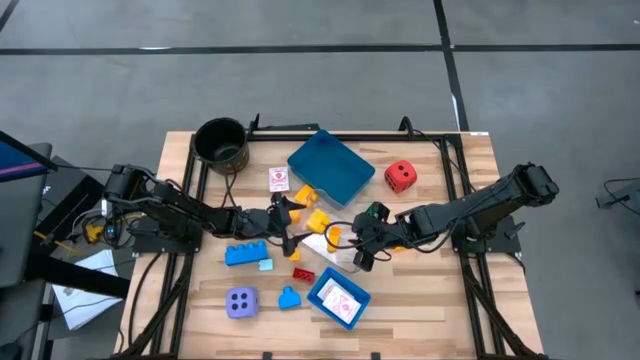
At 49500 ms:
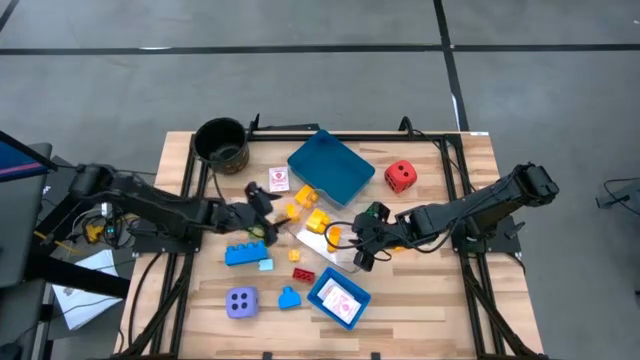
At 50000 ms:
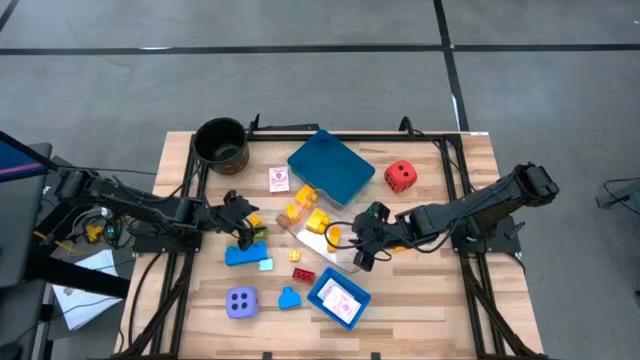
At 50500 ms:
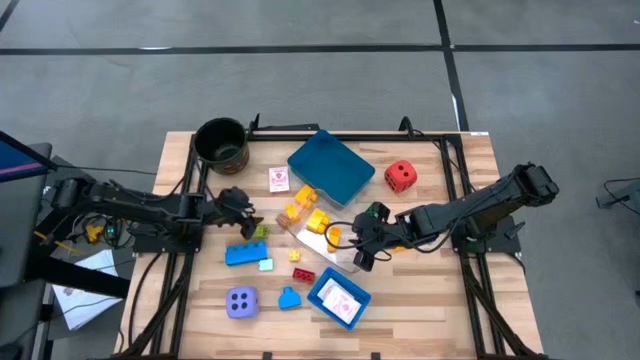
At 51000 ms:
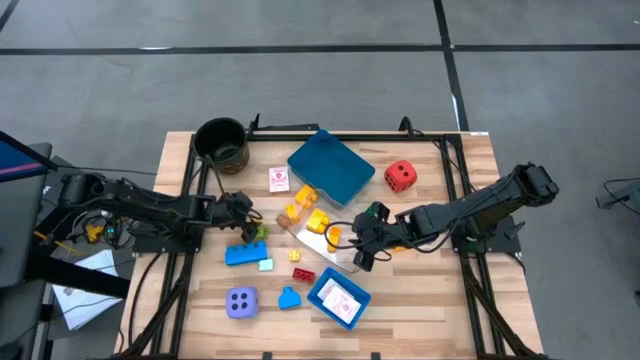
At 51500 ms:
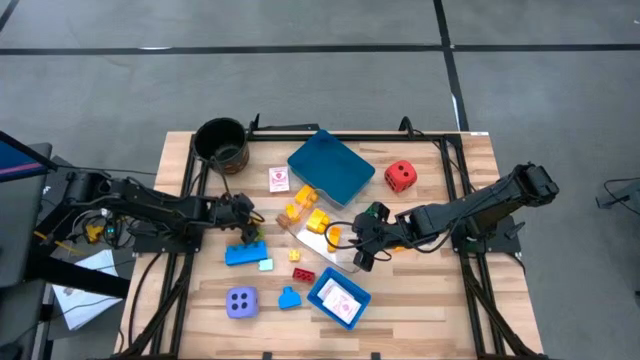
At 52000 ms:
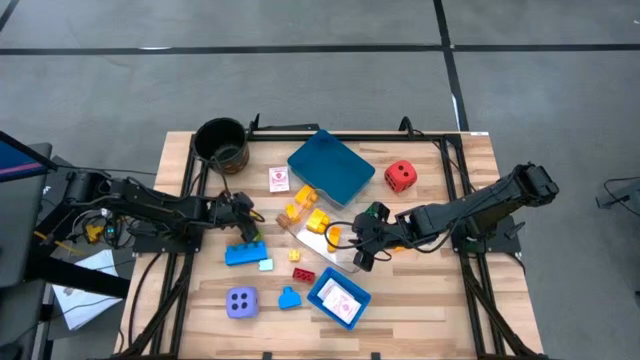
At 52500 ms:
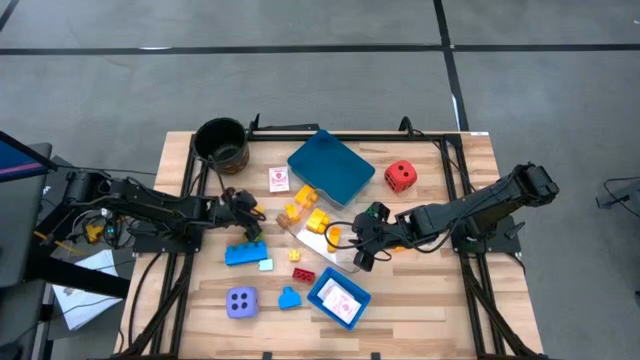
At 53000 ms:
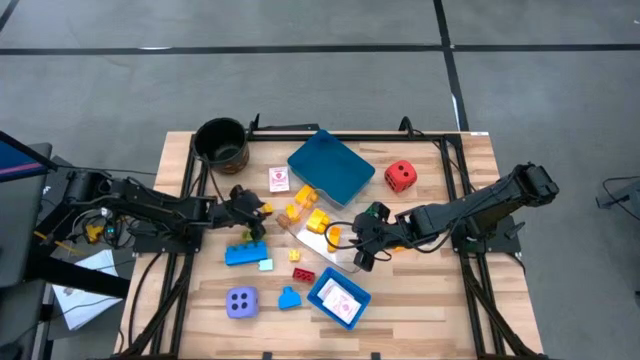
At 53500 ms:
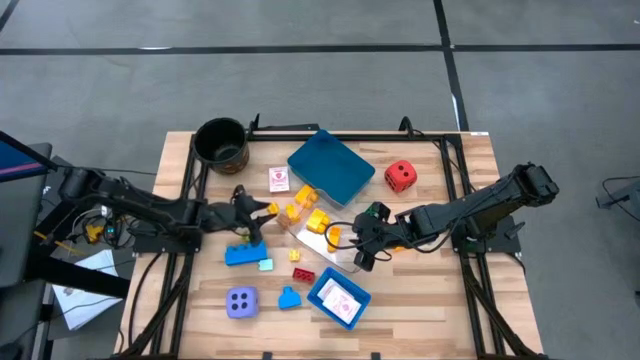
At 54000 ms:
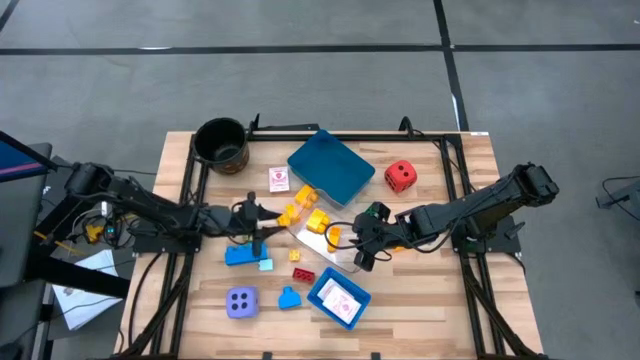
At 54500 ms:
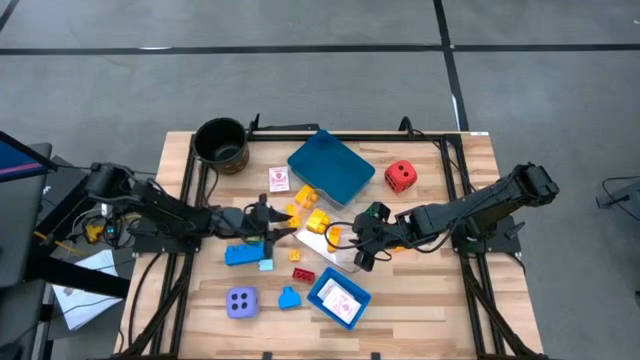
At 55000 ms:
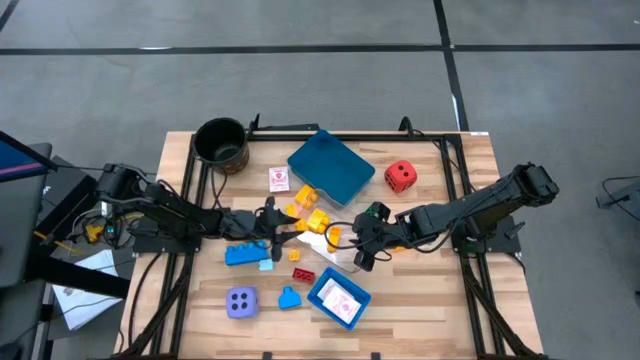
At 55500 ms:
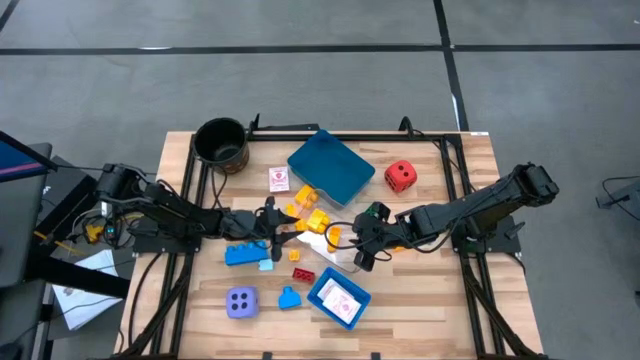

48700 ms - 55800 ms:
Task: Pick & Place Toys
Put the yellow game piece block into the transparent bin

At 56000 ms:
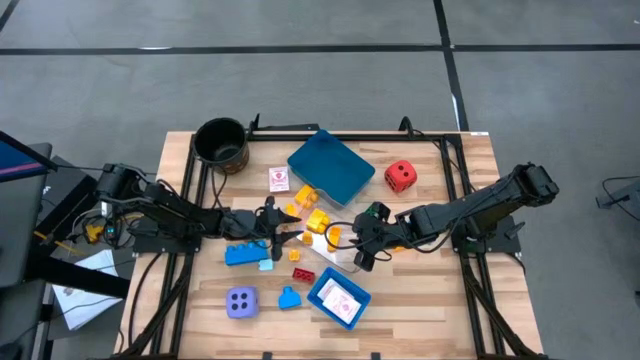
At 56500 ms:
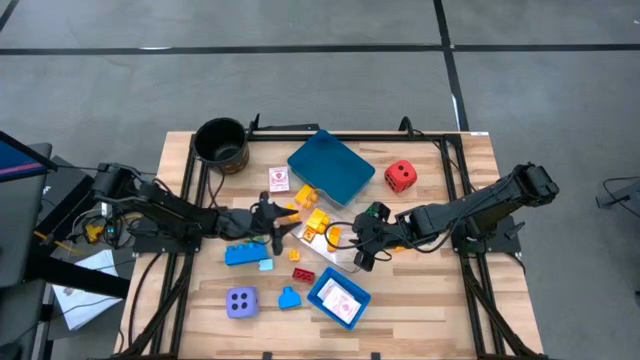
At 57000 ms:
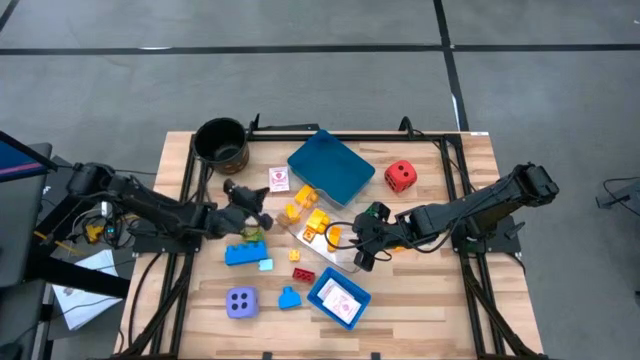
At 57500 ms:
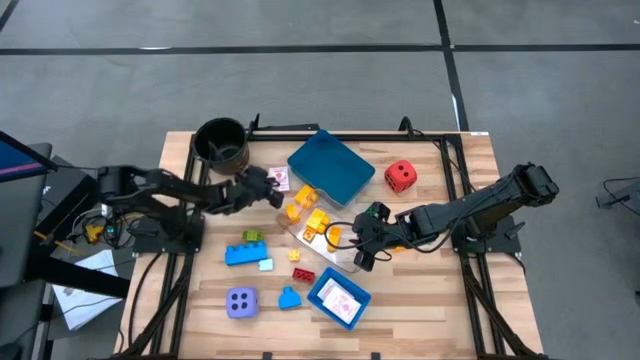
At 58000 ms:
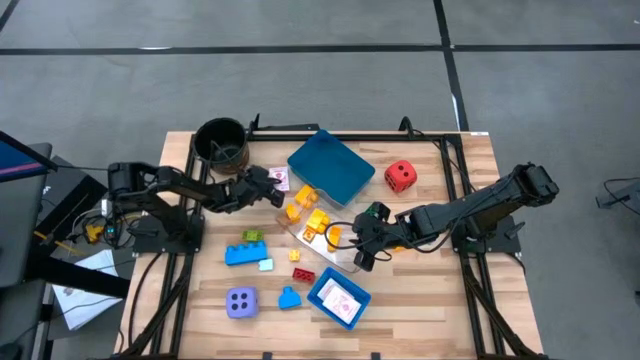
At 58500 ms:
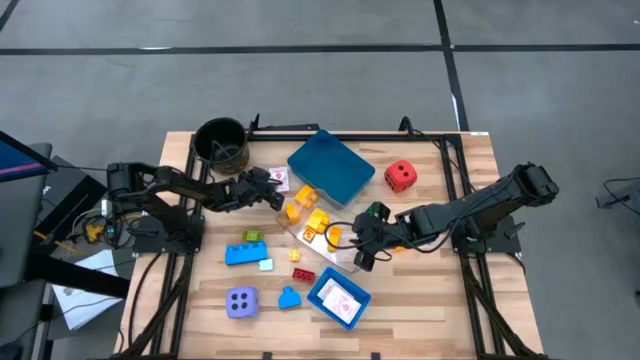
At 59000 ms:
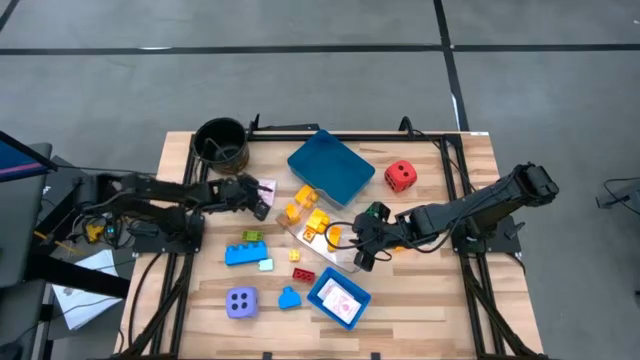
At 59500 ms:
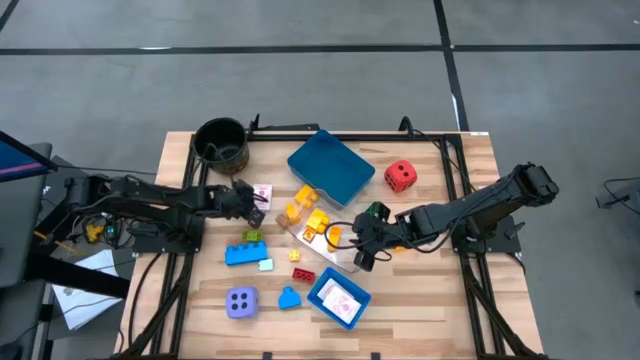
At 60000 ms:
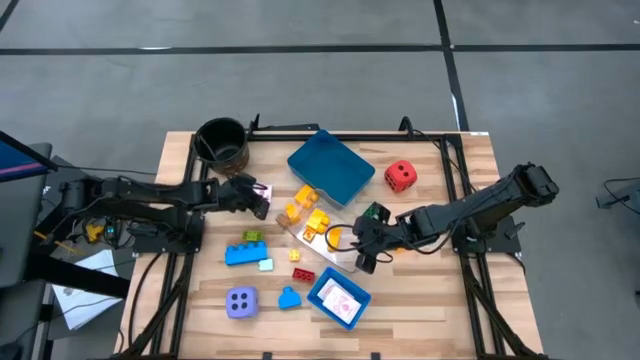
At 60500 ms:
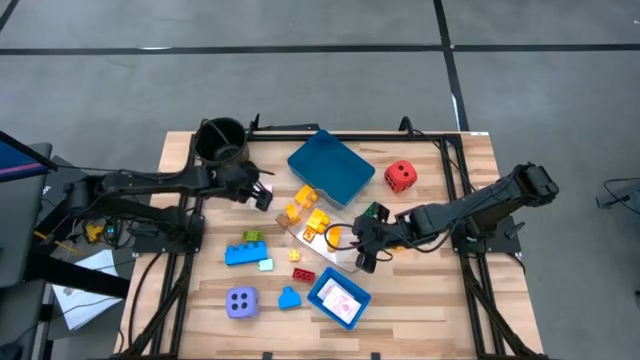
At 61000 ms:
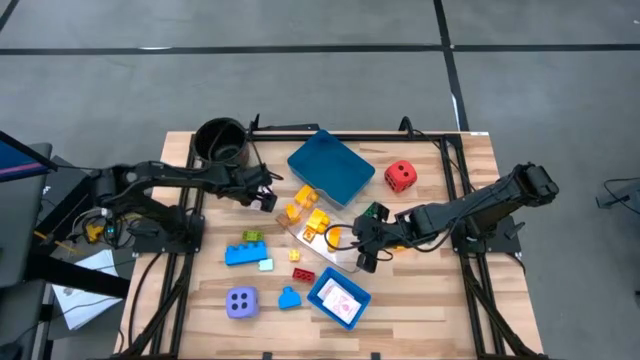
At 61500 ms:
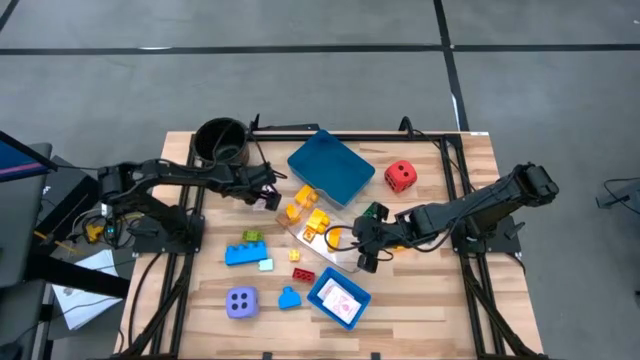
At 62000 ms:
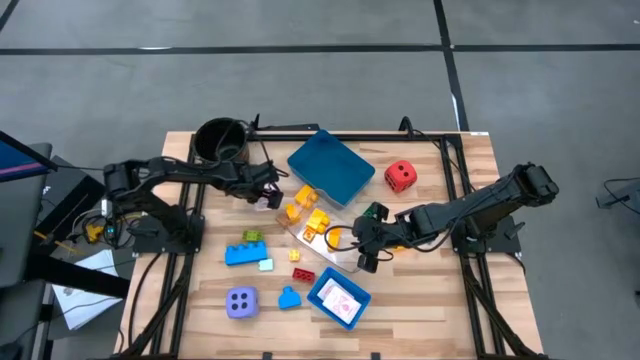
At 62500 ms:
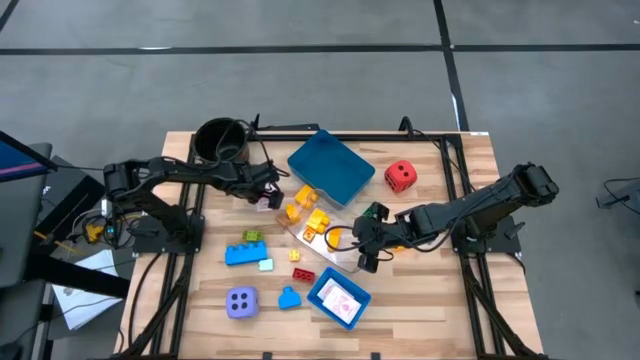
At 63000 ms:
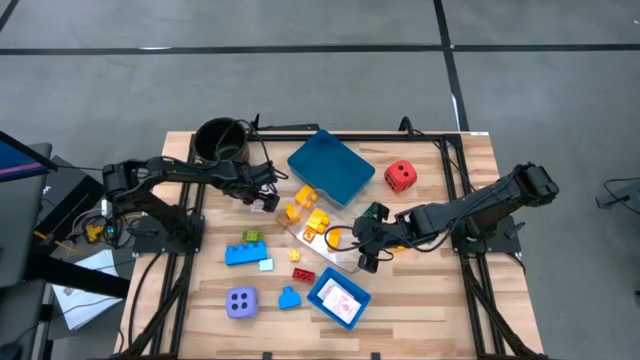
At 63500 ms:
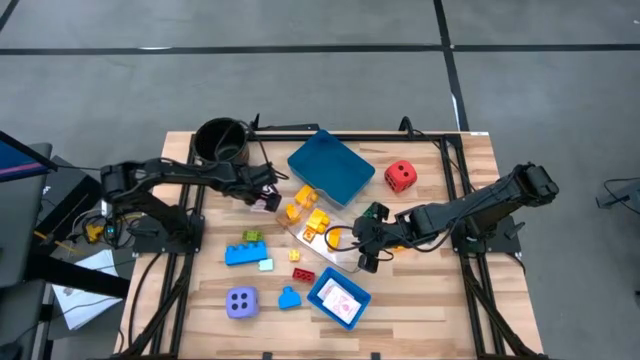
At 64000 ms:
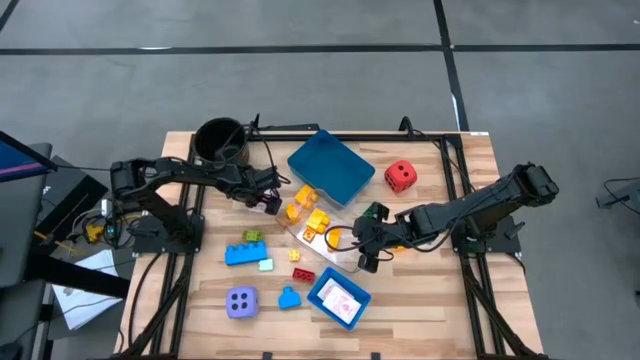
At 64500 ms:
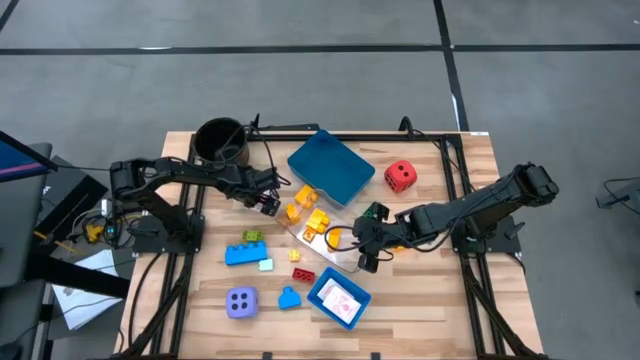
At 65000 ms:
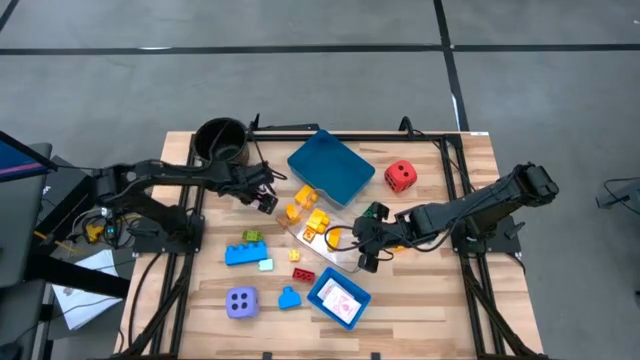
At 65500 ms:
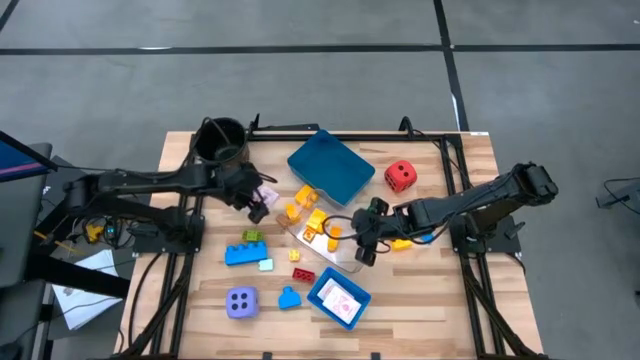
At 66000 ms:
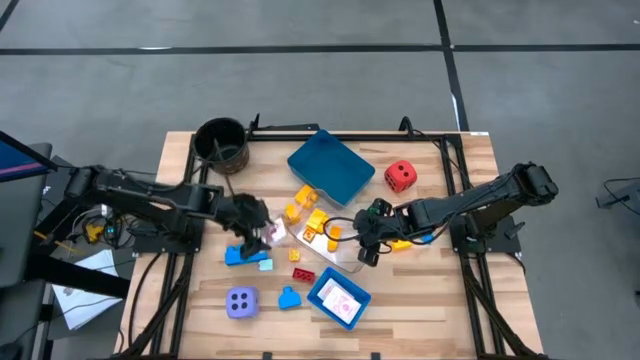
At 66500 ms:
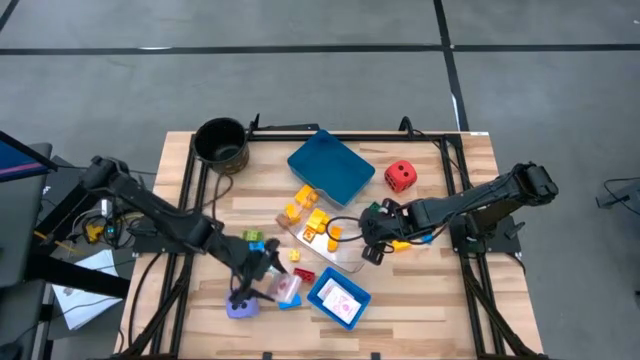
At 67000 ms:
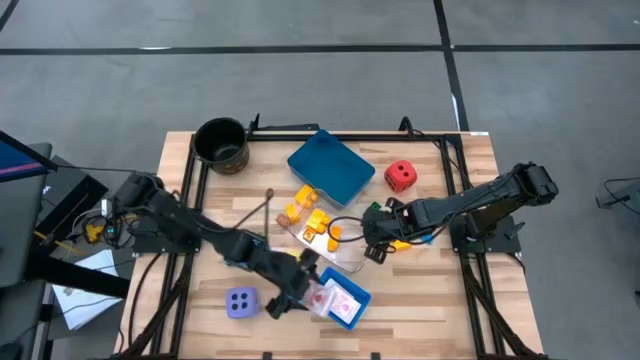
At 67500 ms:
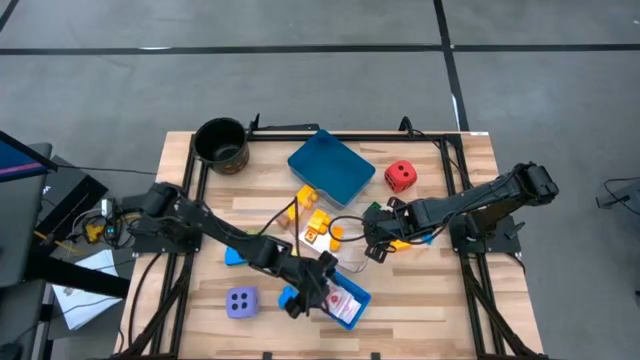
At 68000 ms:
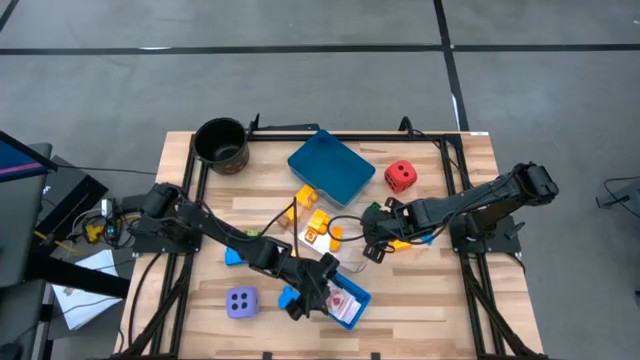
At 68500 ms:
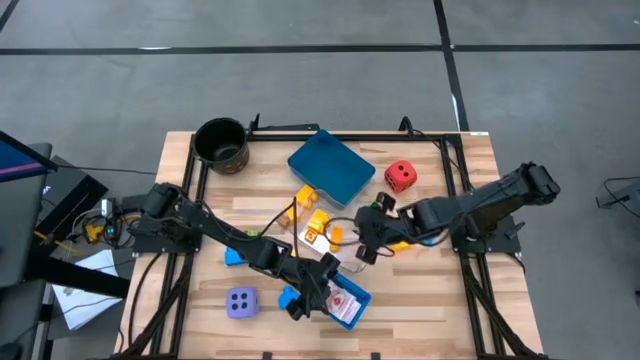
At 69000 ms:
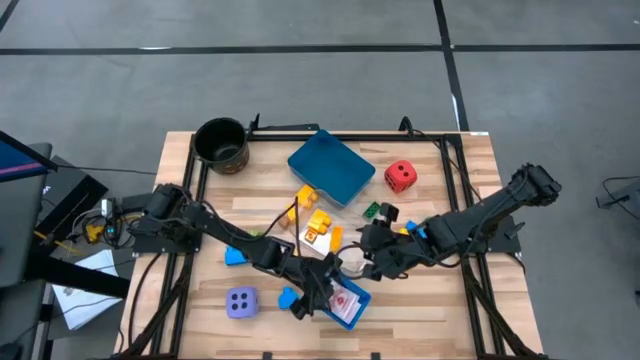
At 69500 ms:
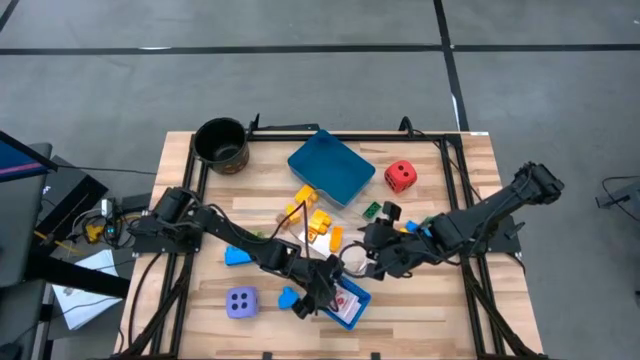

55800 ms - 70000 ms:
Put the red playing card box into the blue bin

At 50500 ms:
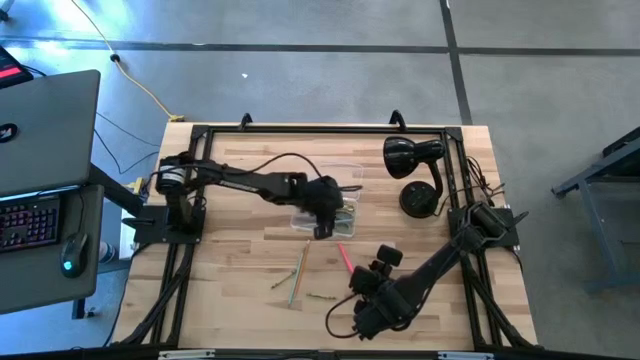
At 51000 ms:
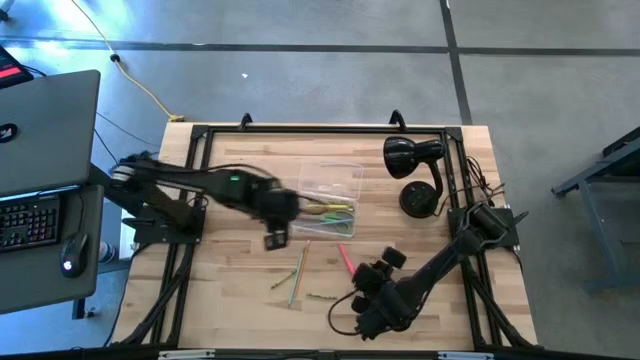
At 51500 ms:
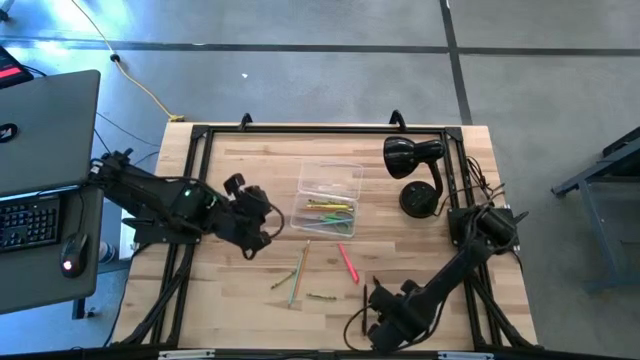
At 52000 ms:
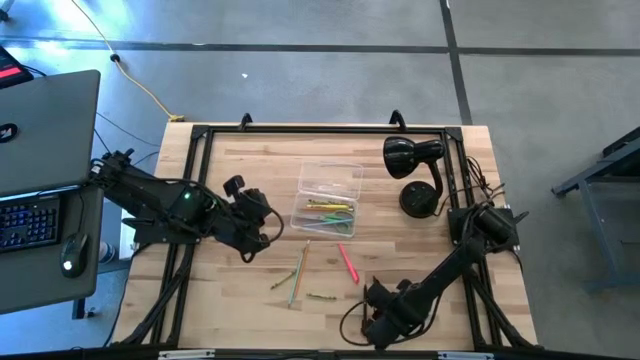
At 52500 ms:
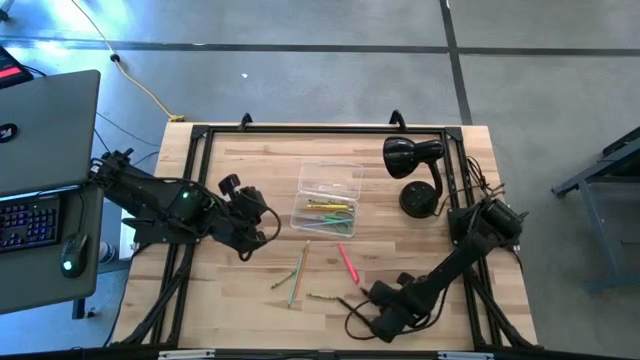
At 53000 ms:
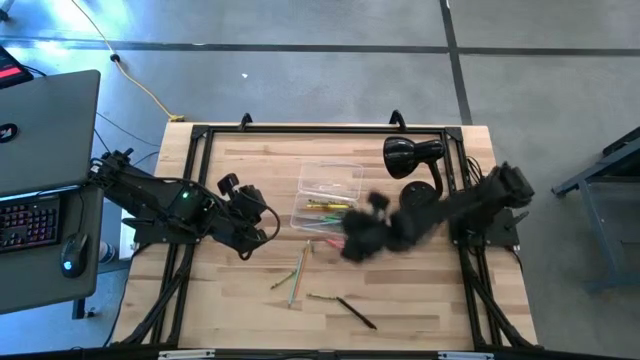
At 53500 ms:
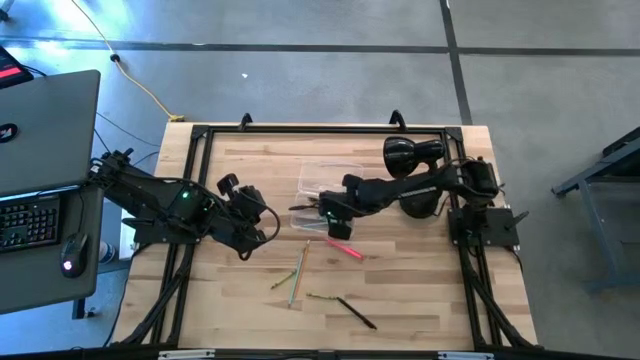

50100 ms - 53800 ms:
Task: Pick & place school supplies into a supply box
Put the black transparent pen into the transparent supply box
